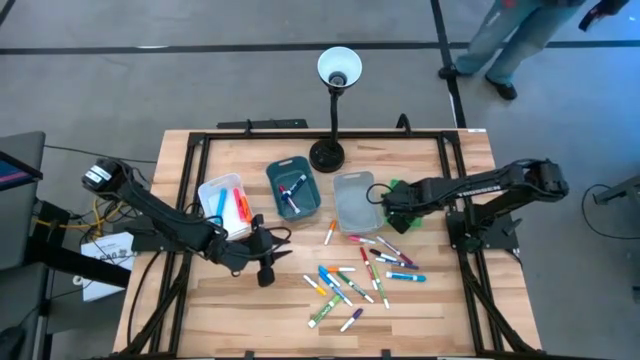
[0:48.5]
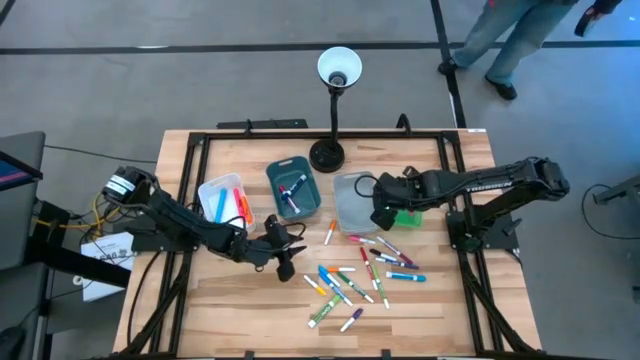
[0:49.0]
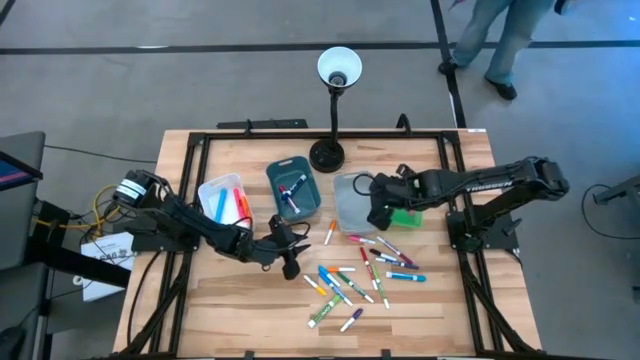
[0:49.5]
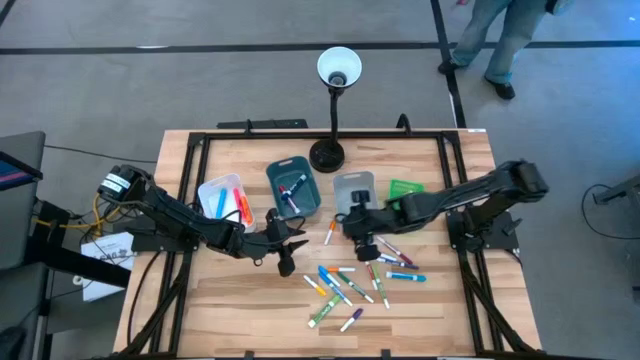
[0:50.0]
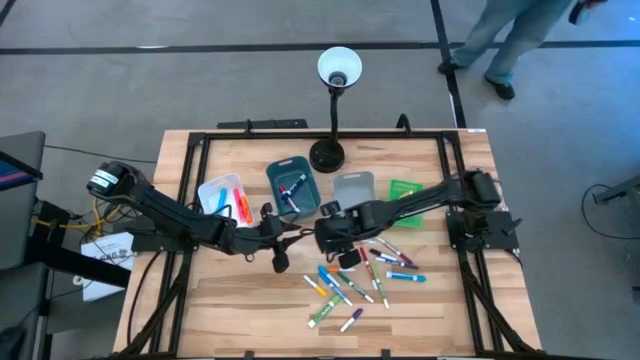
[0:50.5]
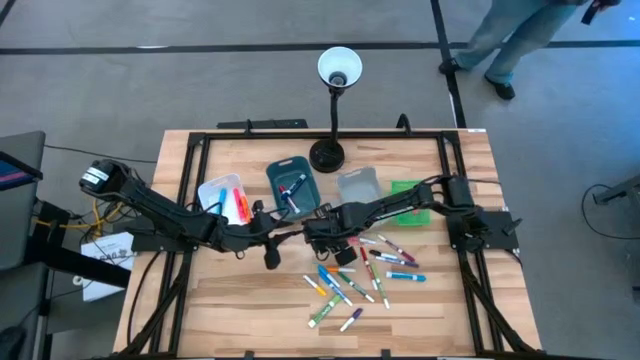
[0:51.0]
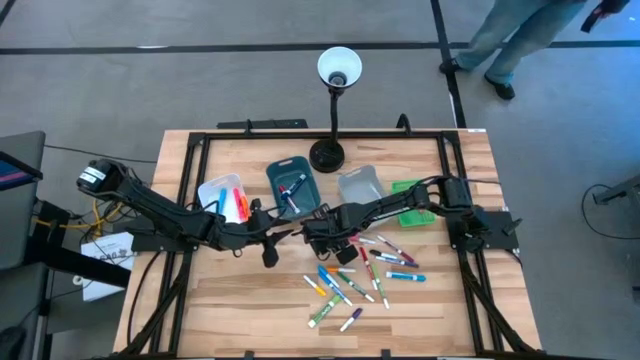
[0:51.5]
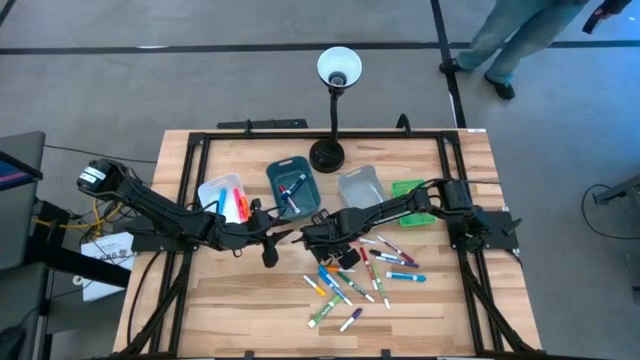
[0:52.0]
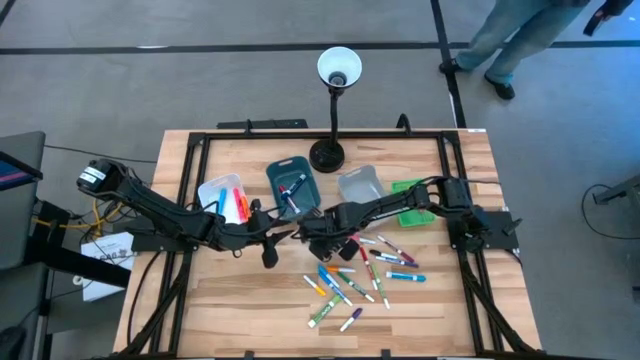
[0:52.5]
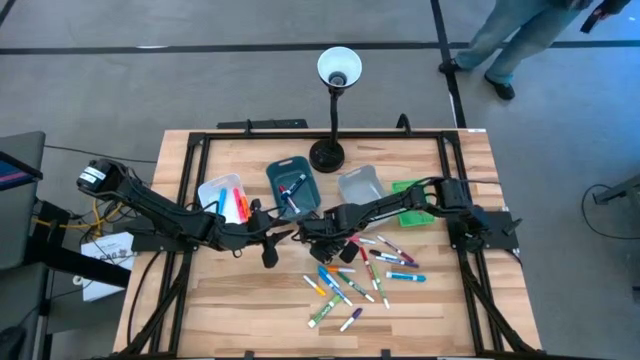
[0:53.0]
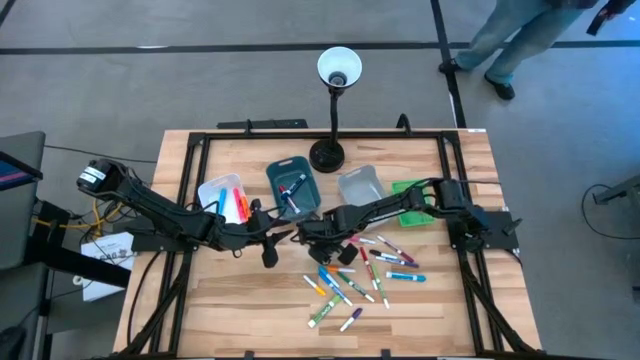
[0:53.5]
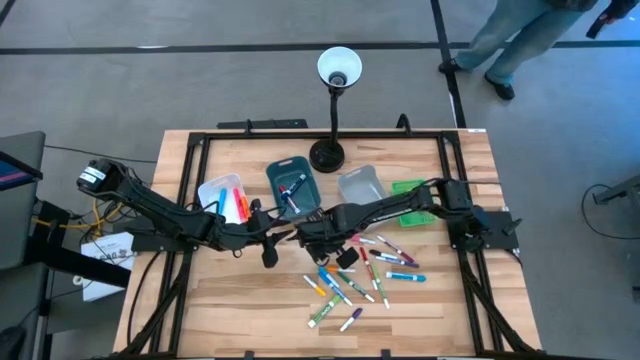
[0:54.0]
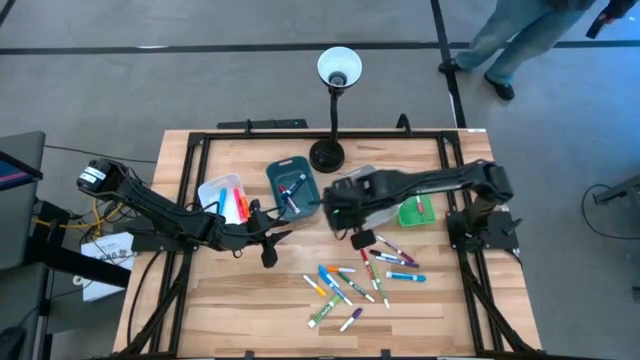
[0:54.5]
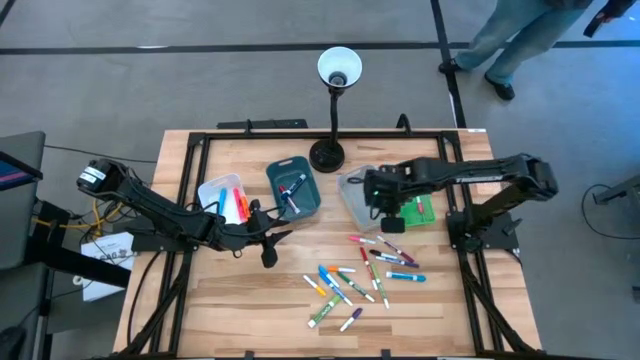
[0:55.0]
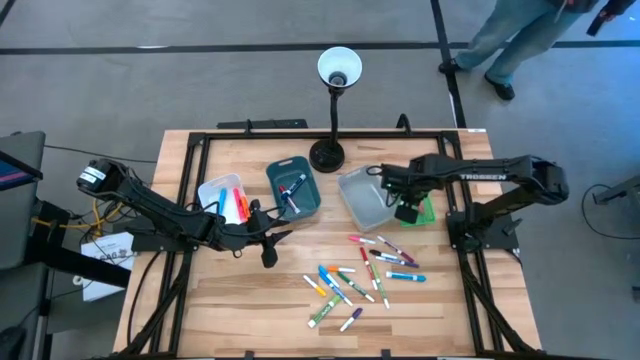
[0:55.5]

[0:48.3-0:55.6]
Task: Pick & Place Markers
Put the orange highlighter pen into the green bin

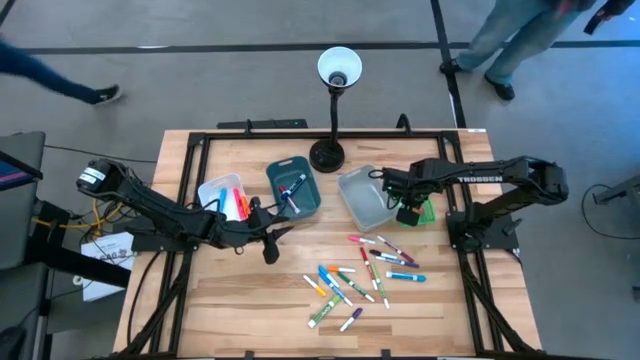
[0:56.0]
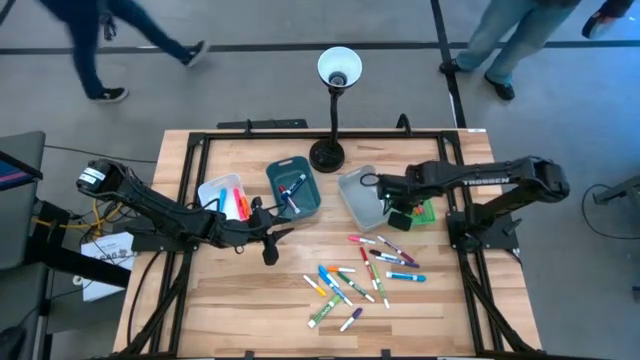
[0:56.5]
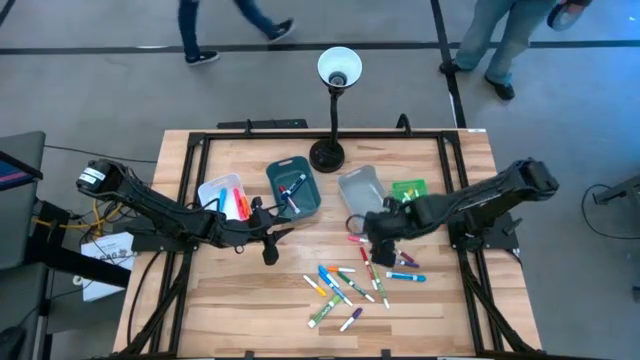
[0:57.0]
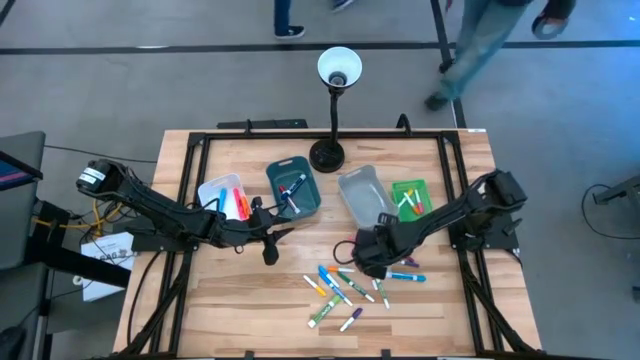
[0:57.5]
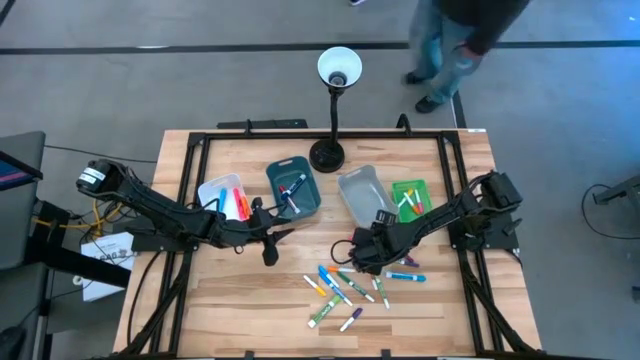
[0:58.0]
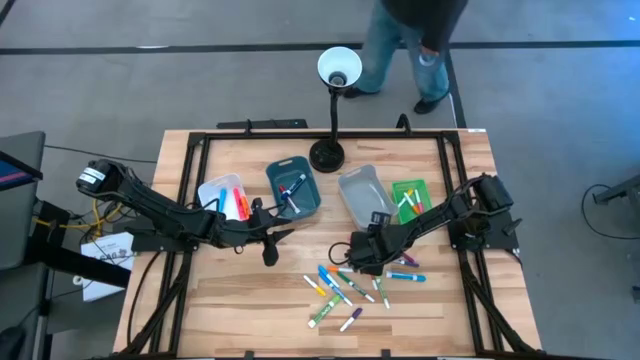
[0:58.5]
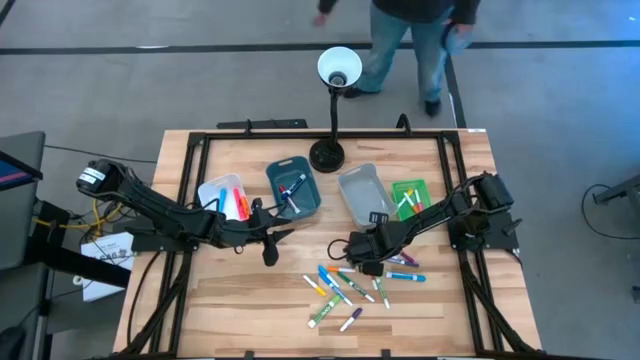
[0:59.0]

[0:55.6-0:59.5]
Put the orange highlighter pen into the green bin

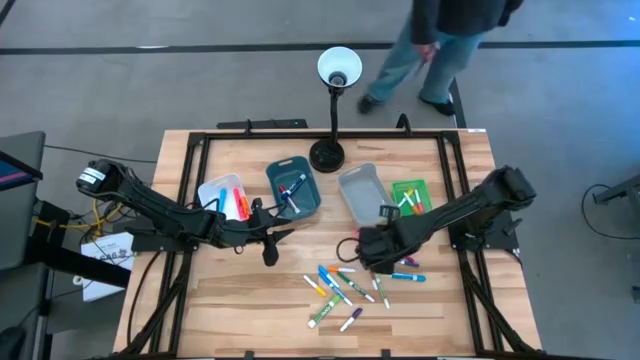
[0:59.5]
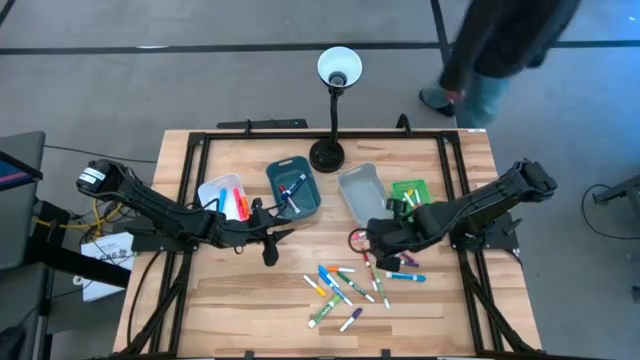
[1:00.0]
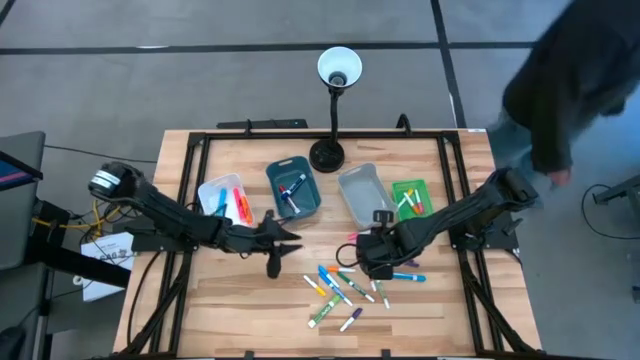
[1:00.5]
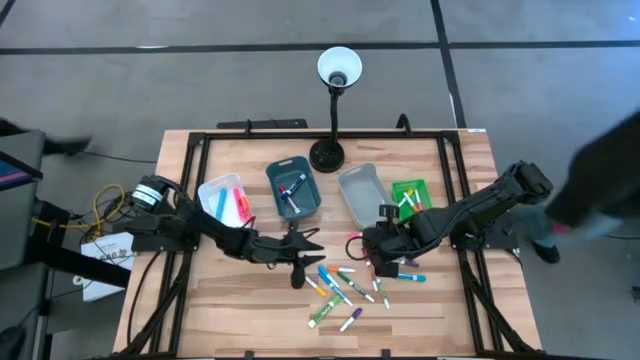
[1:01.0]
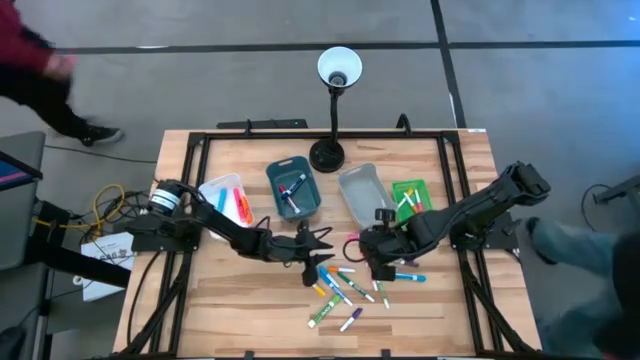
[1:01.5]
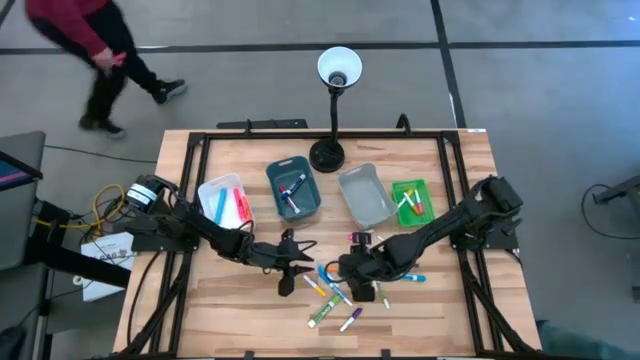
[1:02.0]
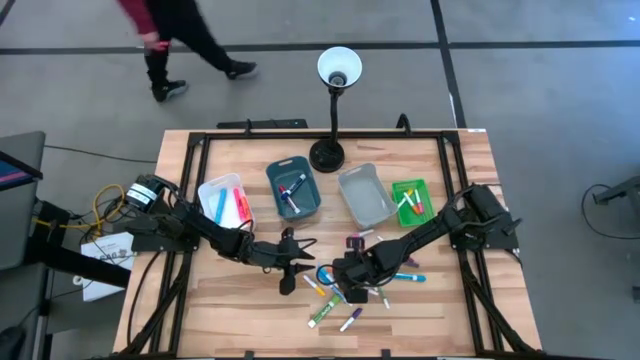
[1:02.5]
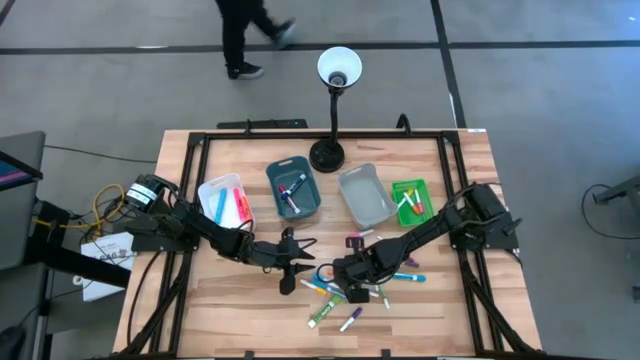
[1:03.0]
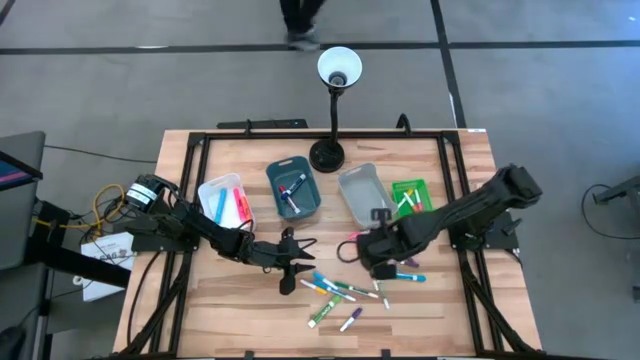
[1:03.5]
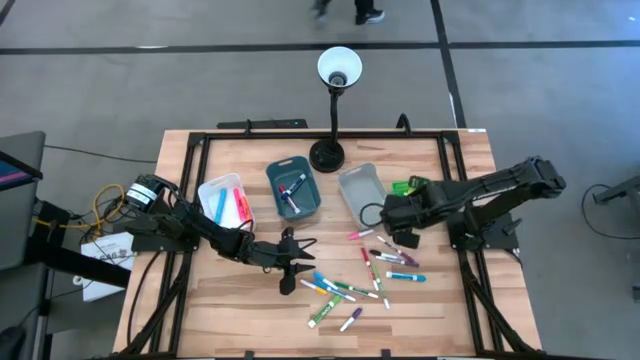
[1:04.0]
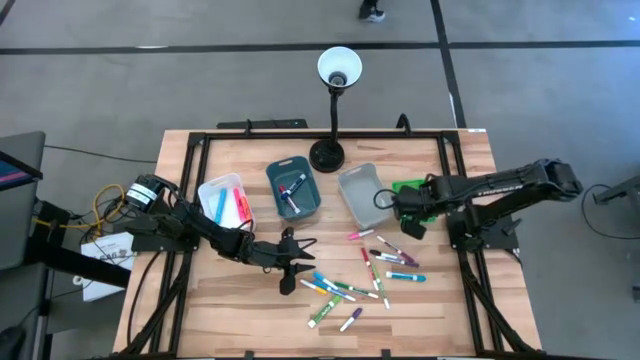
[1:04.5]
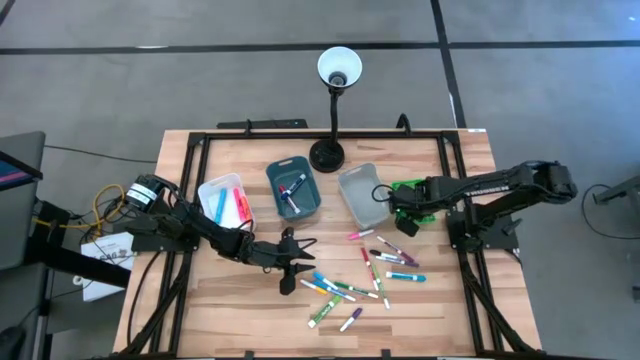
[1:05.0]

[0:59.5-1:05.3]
Put the orange highlighter pen into the green bin

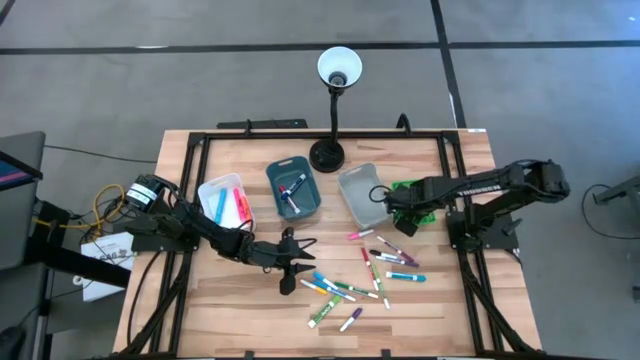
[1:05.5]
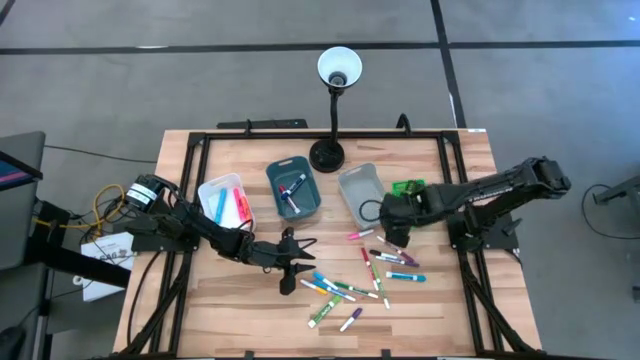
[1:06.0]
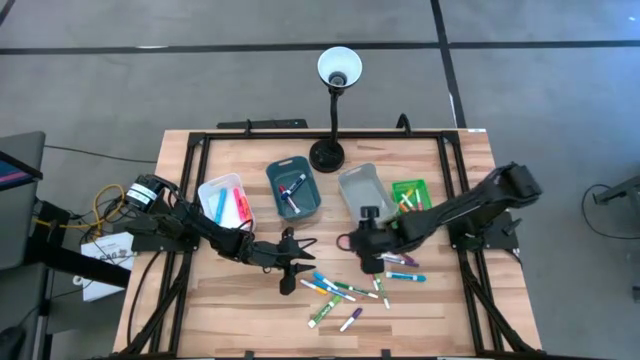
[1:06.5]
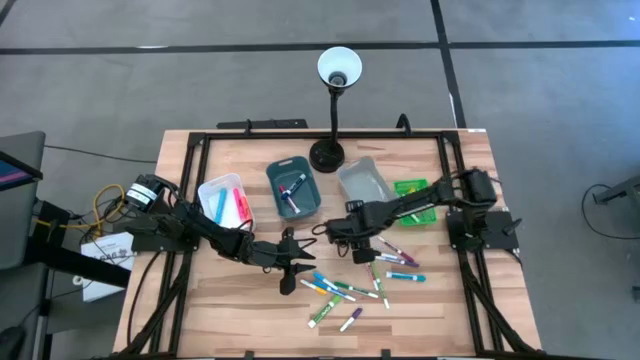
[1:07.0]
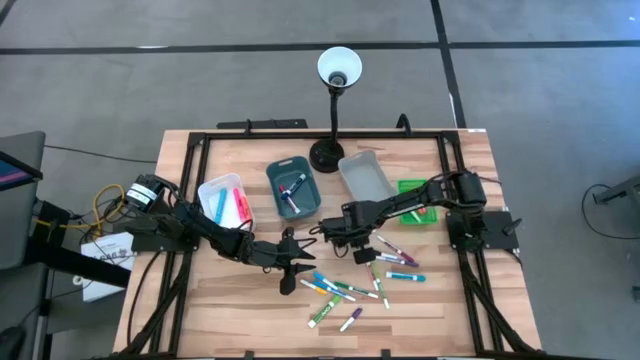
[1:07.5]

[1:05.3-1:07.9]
Put the pink highlighter pen into the green bin

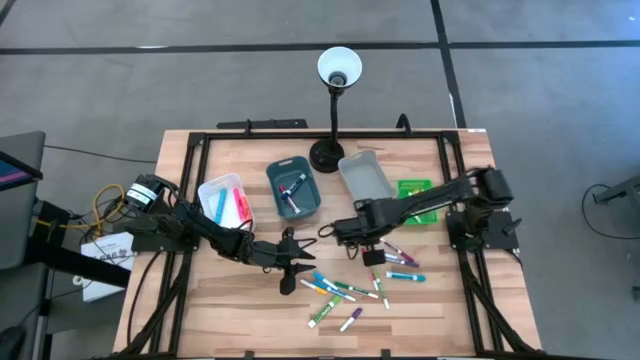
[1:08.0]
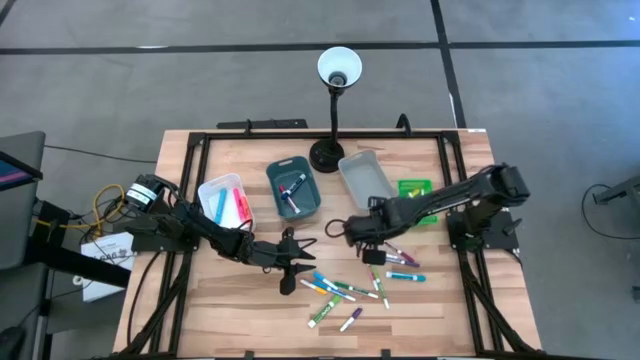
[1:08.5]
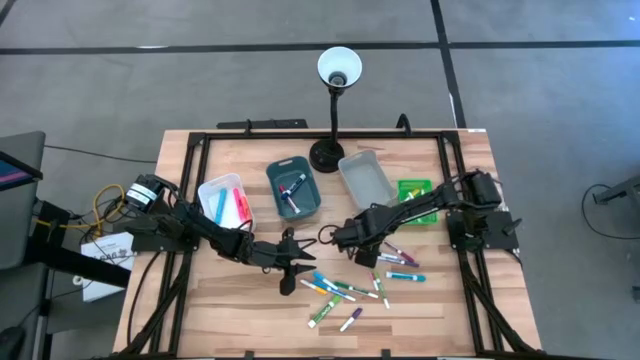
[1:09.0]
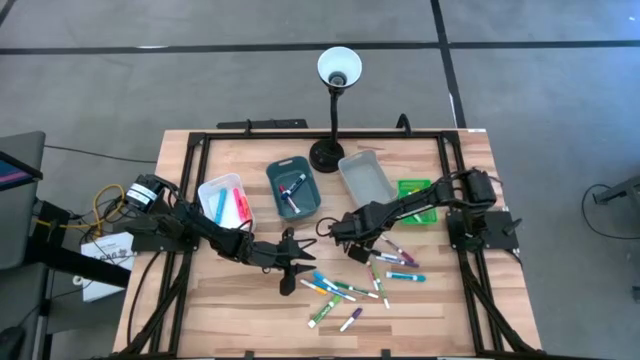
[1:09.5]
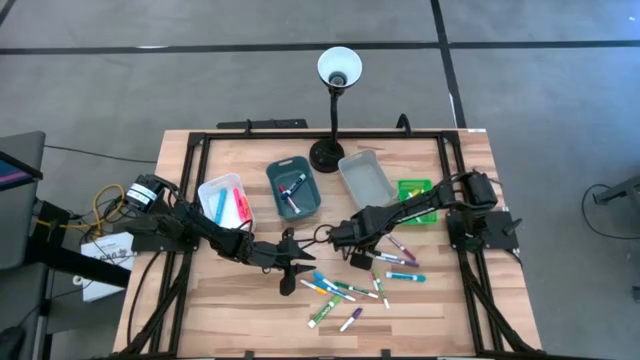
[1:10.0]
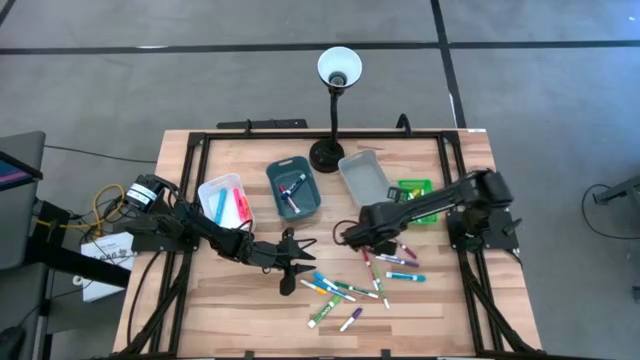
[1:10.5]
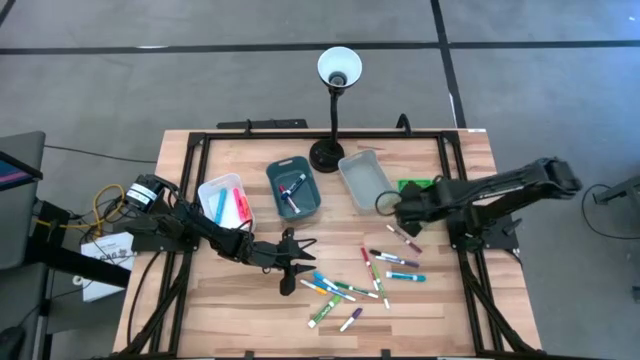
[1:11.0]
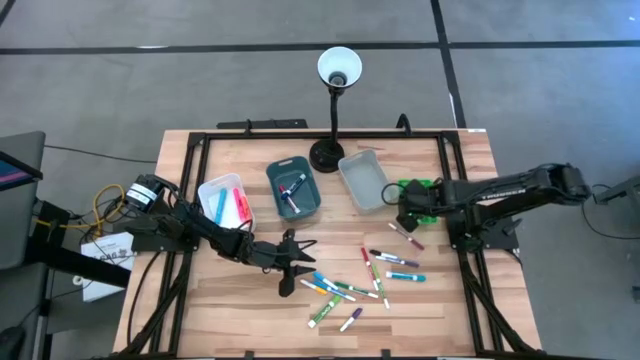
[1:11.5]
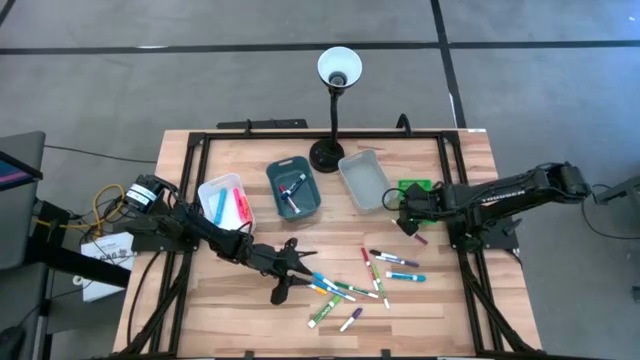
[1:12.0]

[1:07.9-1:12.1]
Put the pink highlighter pen into the green bin
